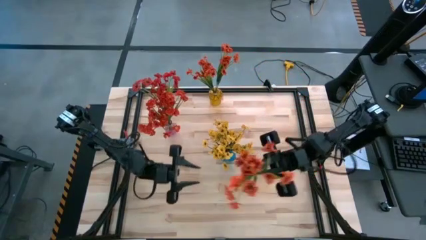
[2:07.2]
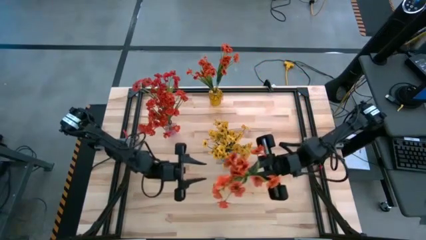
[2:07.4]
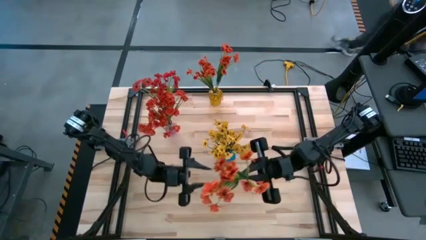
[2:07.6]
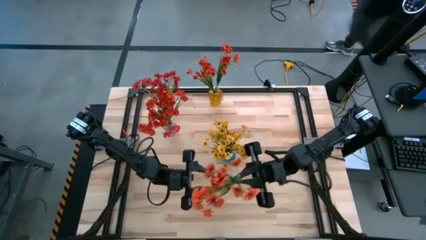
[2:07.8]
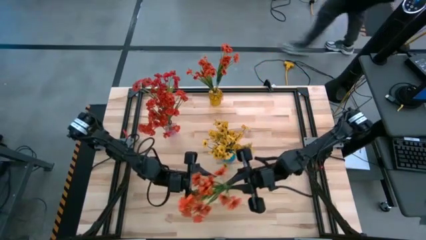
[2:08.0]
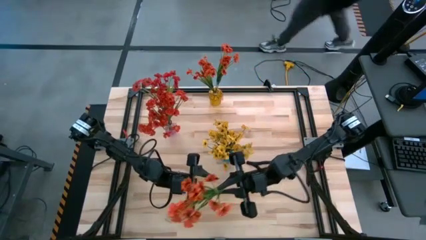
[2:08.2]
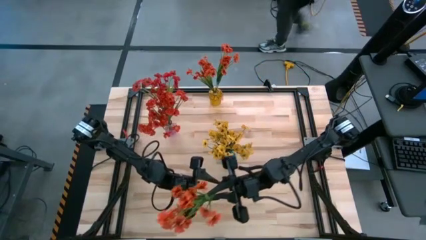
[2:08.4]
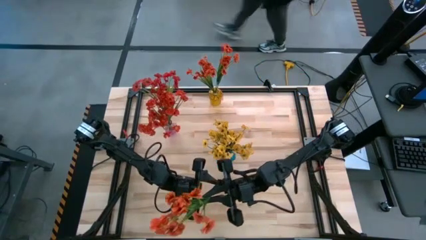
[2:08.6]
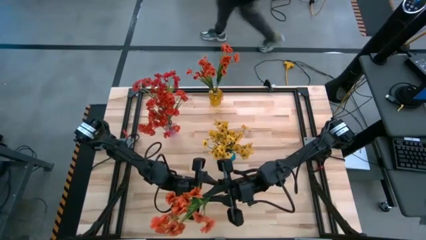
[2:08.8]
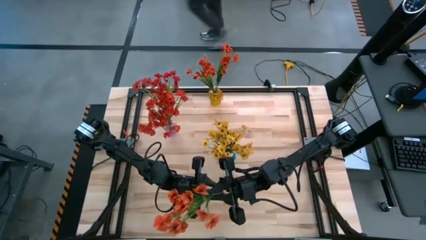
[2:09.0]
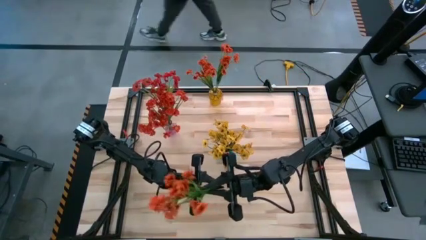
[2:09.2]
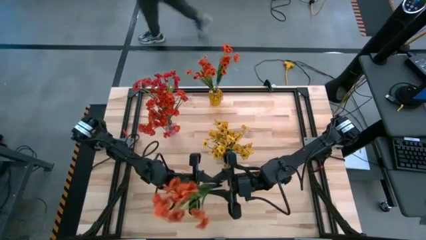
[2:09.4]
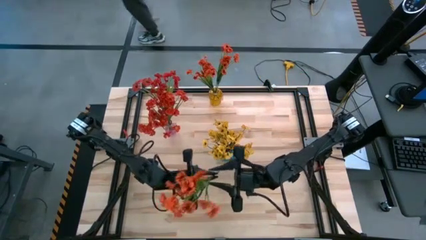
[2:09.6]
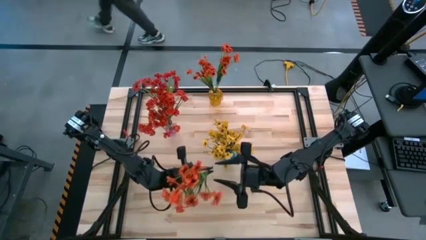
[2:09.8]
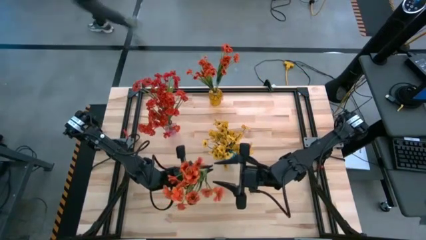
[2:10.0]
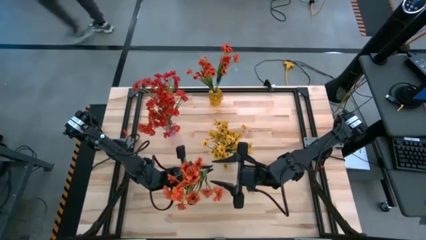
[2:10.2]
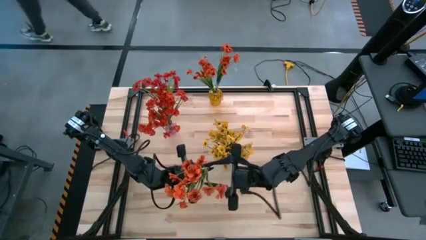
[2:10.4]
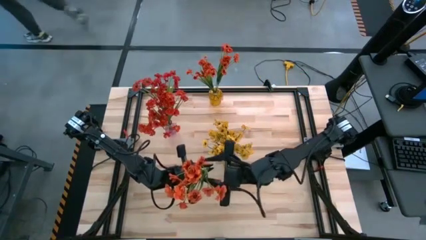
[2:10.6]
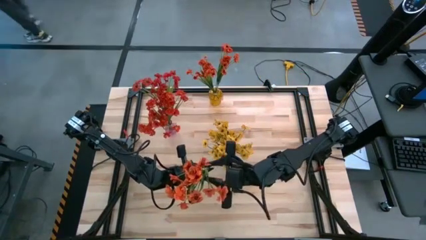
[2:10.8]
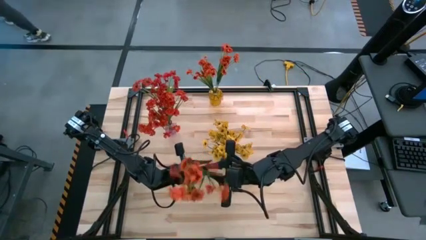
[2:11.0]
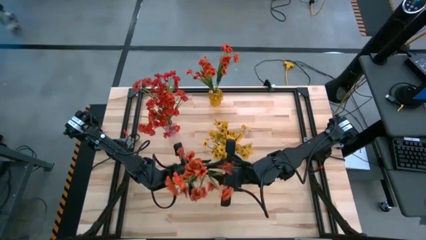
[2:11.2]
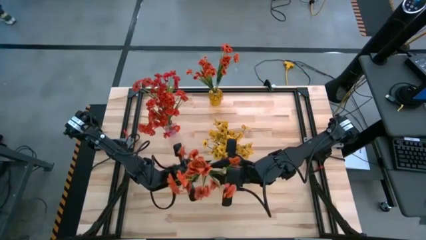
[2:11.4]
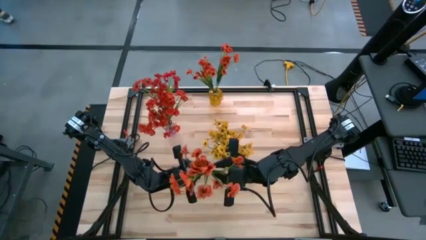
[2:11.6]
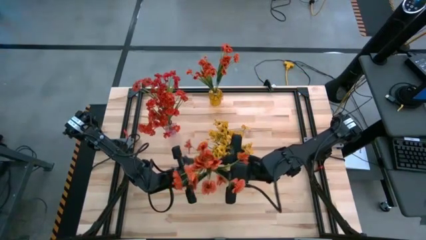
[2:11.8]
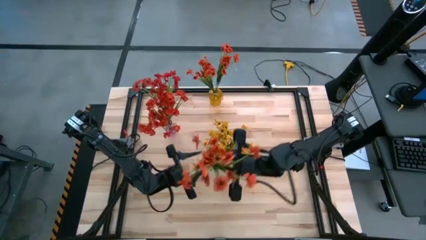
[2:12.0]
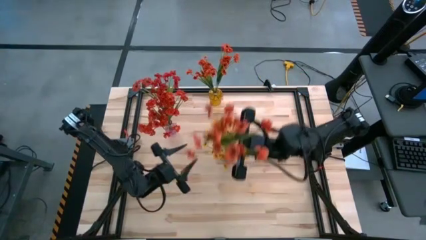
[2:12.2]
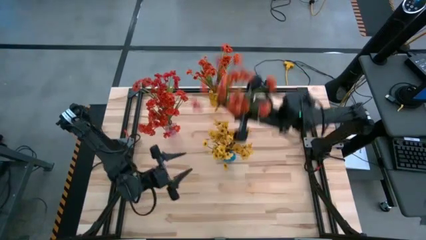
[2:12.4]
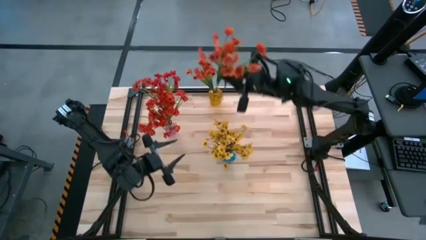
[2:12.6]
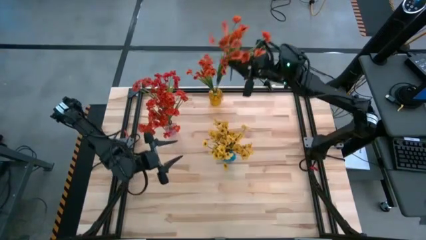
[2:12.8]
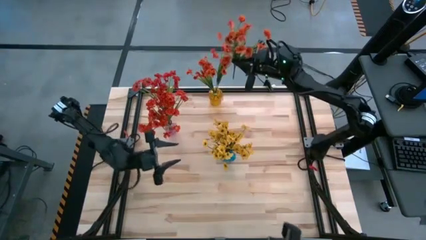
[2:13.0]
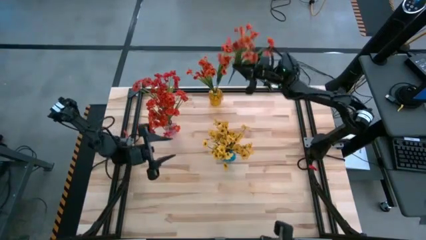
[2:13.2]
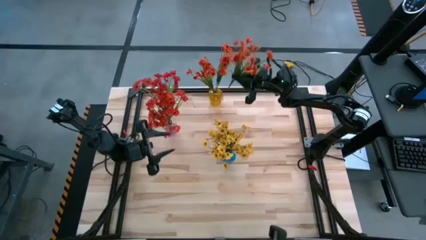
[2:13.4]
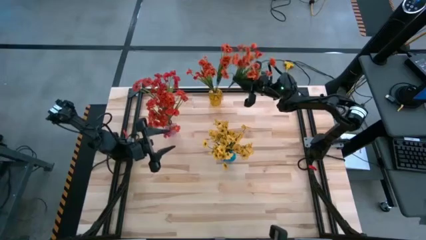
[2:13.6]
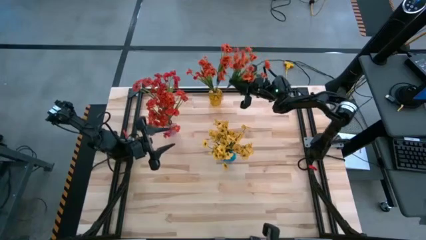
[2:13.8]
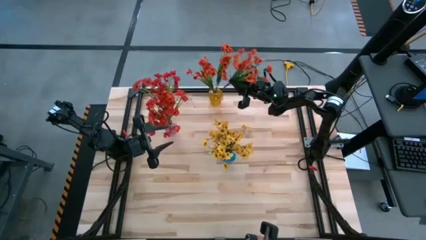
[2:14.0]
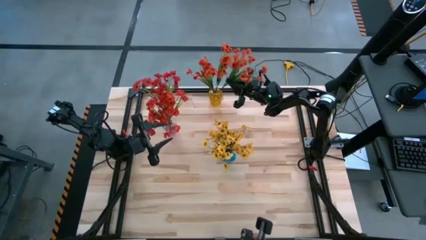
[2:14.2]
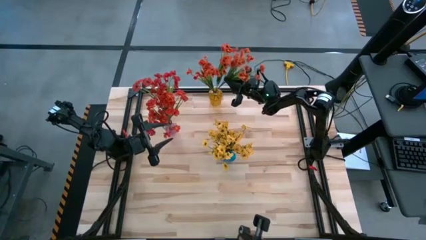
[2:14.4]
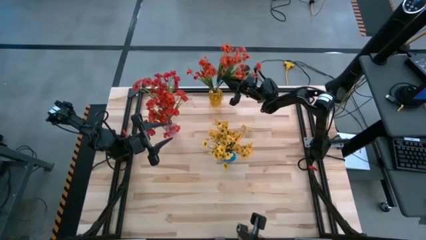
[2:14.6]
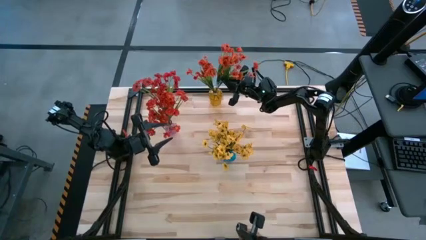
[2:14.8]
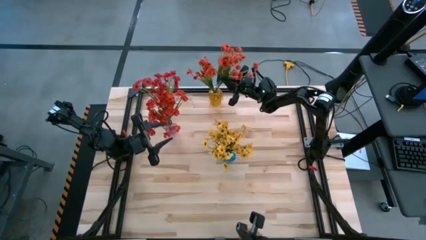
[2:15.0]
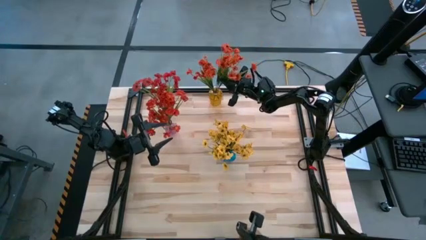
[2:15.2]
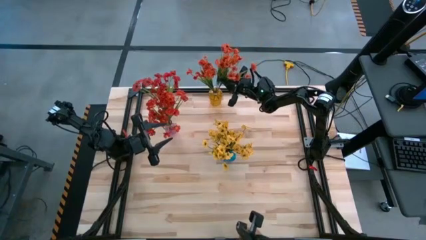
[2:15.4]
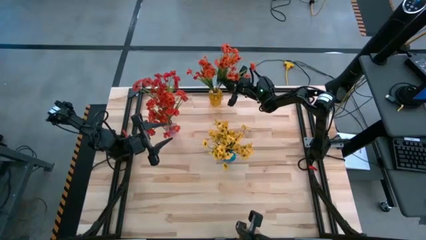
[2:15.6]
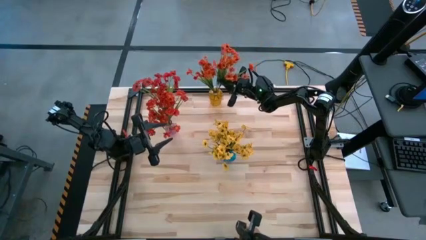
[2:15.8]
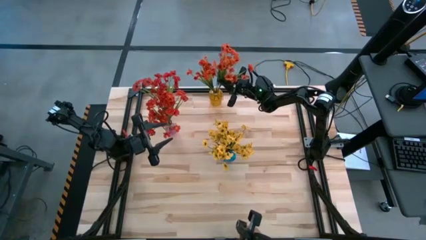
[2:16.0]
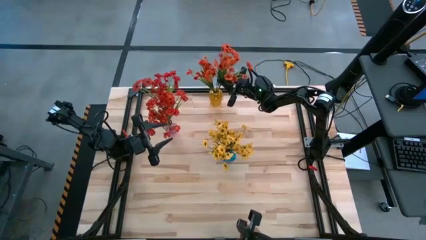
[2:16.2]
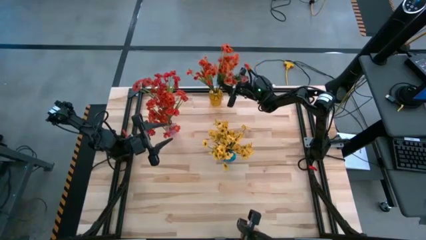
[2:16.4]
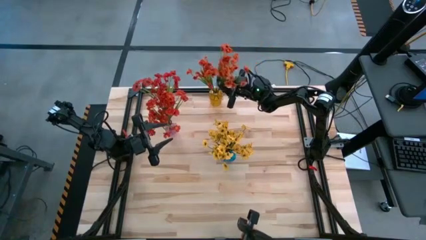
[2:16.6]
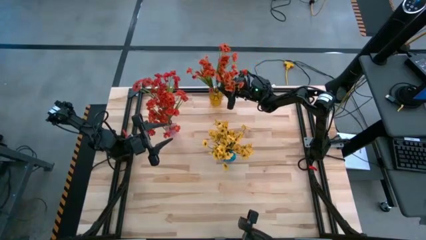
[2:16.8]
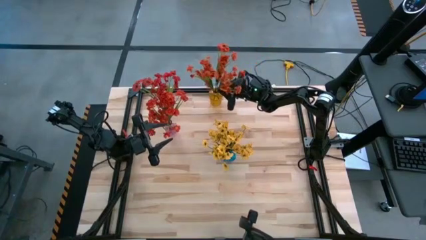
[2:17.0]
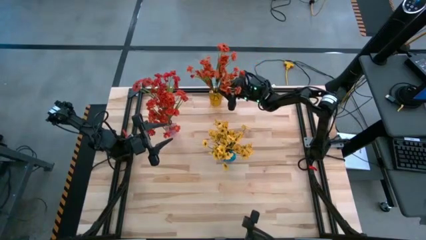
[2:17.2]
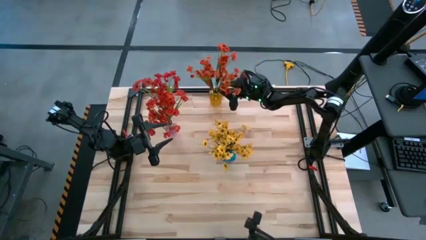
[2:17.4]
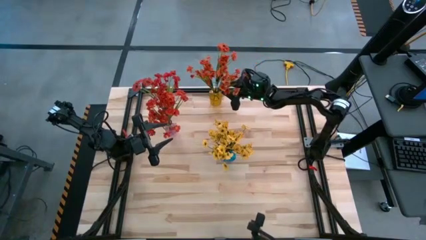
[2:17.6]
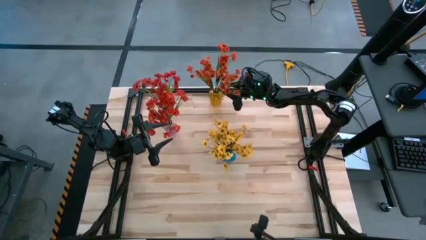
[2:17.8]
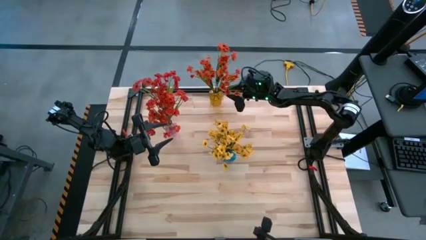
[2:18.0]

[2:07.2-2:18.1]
Task: Sort flowers into vase by color
Put the orange flowers into the yellow vase
